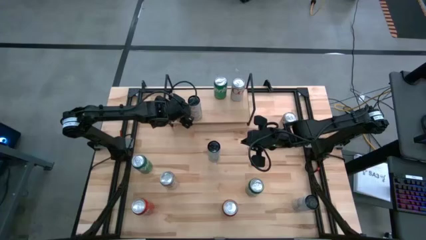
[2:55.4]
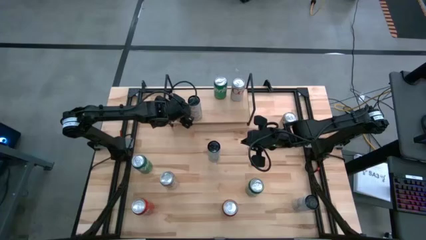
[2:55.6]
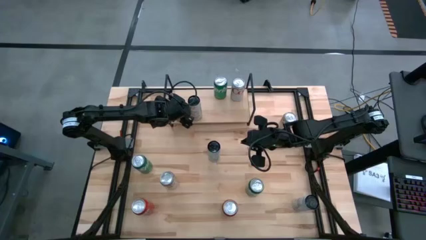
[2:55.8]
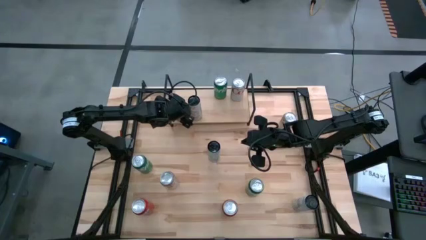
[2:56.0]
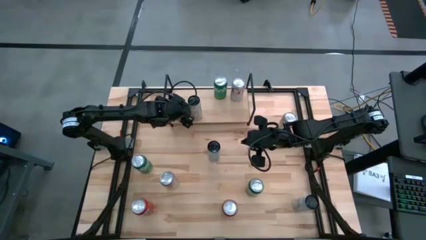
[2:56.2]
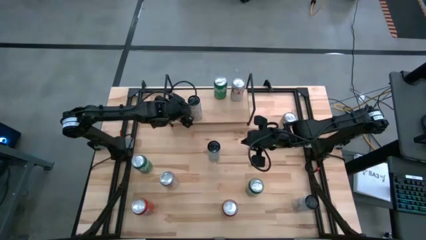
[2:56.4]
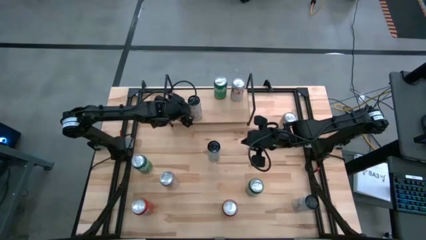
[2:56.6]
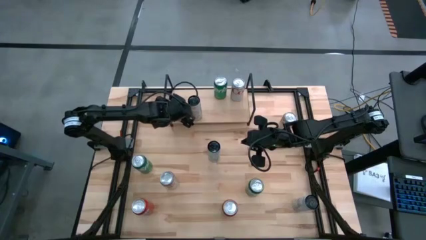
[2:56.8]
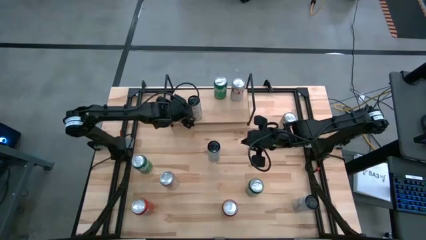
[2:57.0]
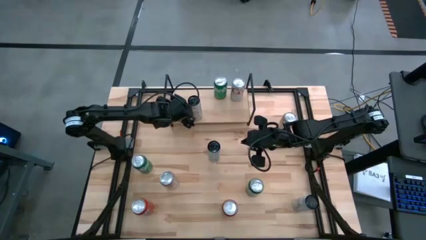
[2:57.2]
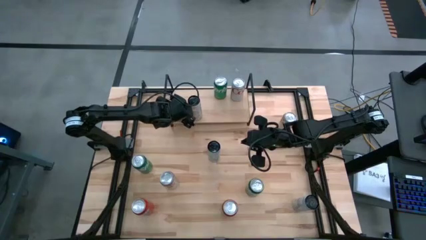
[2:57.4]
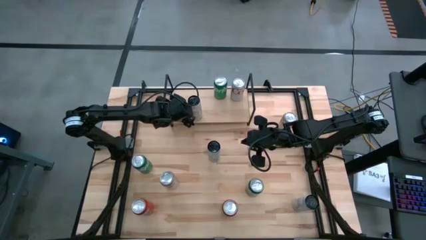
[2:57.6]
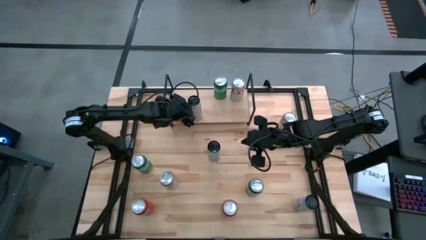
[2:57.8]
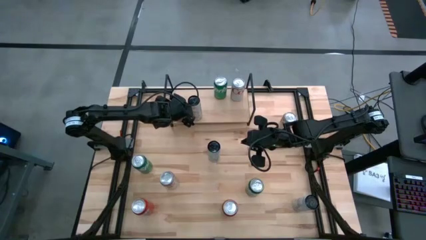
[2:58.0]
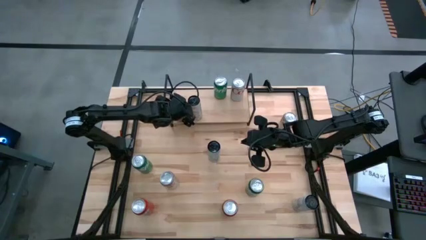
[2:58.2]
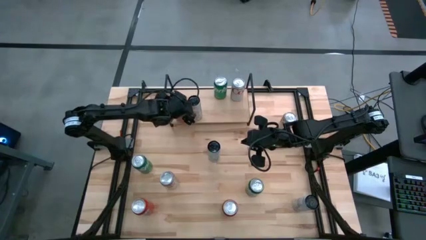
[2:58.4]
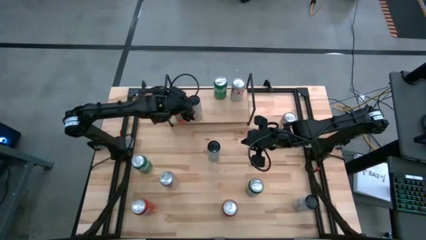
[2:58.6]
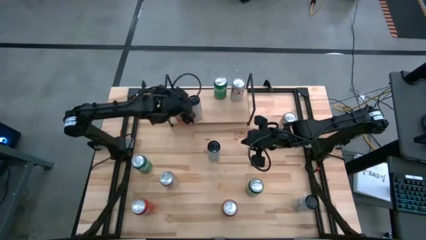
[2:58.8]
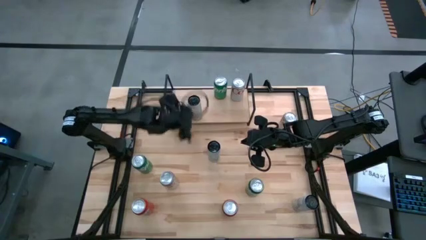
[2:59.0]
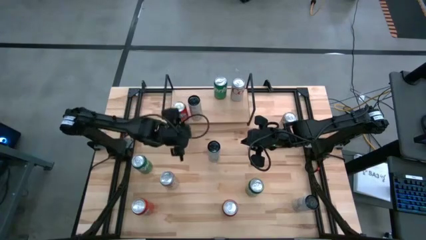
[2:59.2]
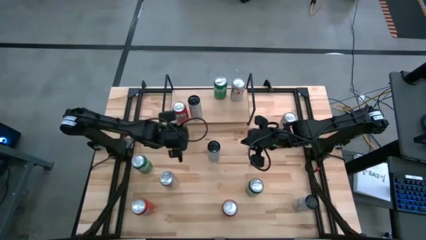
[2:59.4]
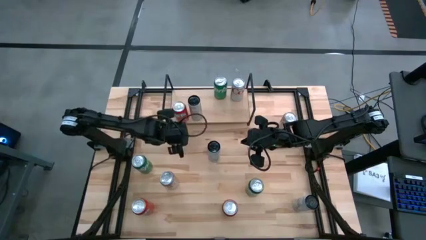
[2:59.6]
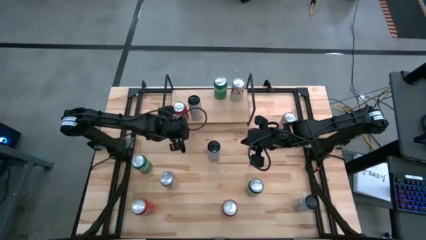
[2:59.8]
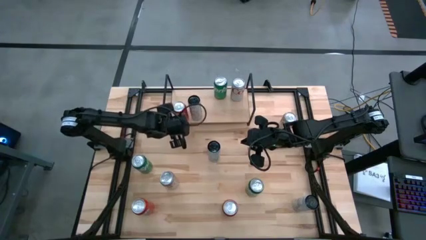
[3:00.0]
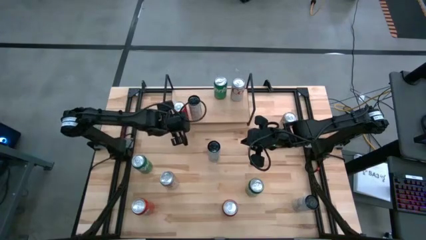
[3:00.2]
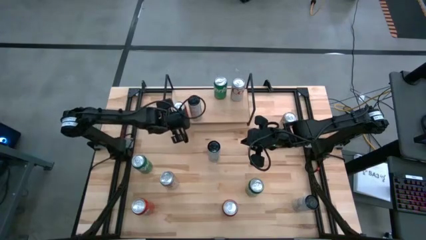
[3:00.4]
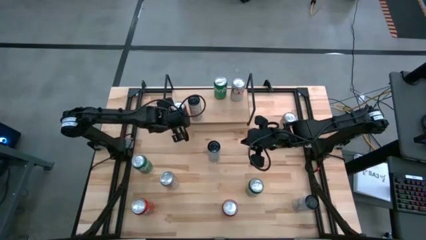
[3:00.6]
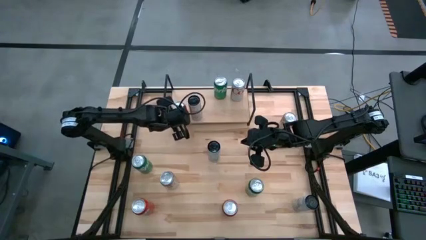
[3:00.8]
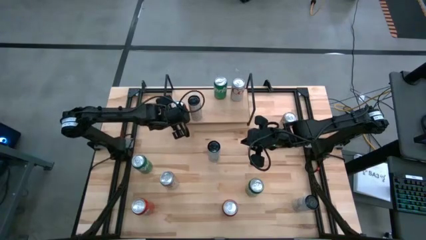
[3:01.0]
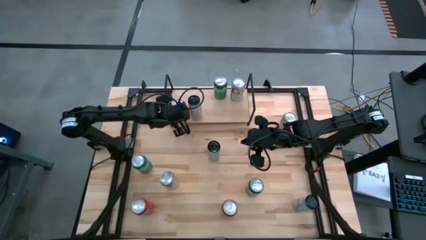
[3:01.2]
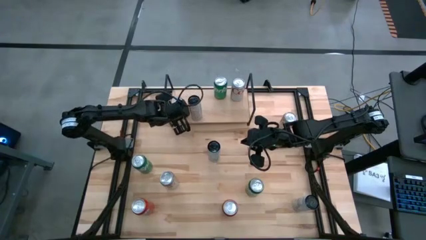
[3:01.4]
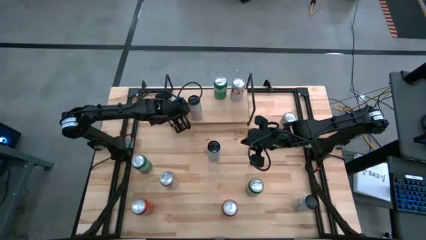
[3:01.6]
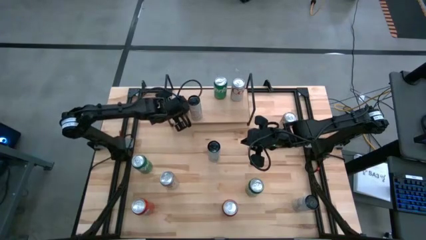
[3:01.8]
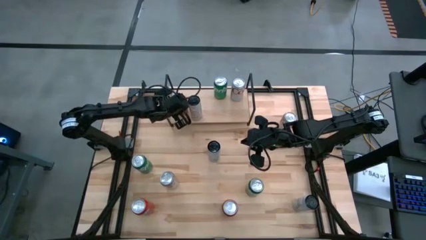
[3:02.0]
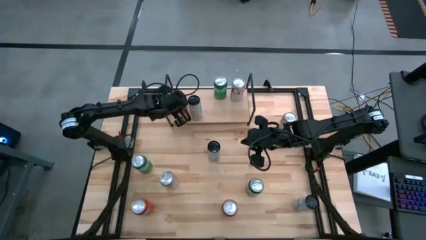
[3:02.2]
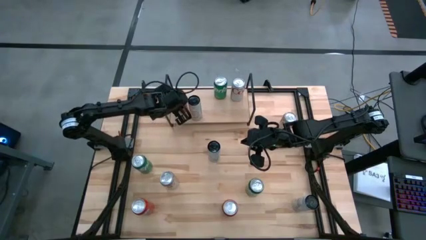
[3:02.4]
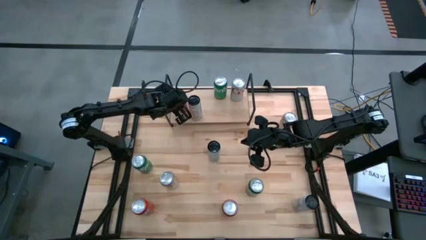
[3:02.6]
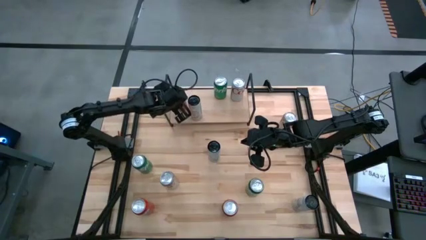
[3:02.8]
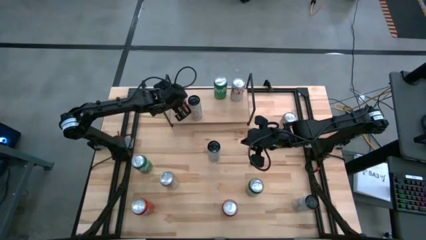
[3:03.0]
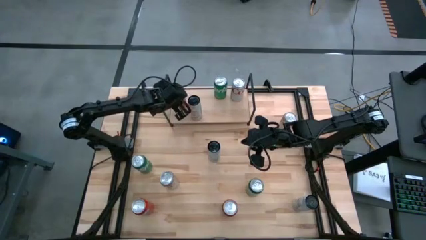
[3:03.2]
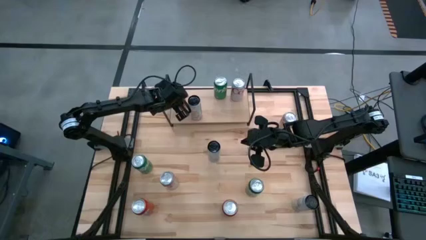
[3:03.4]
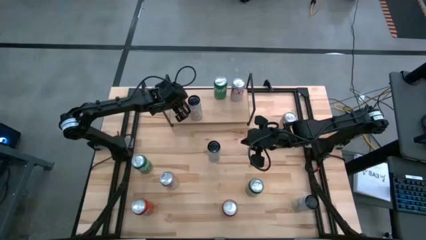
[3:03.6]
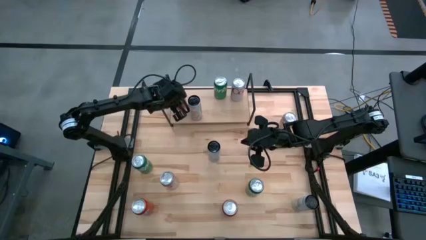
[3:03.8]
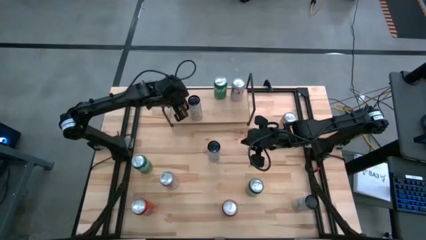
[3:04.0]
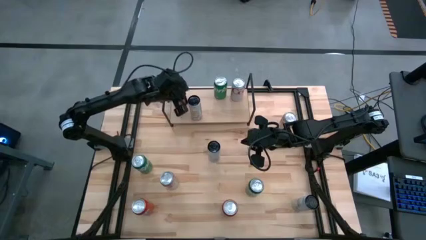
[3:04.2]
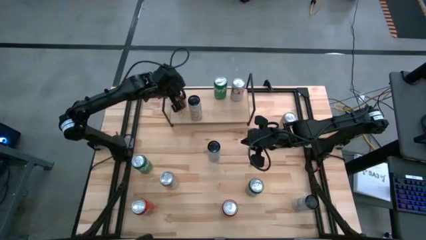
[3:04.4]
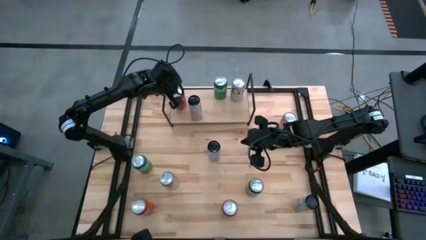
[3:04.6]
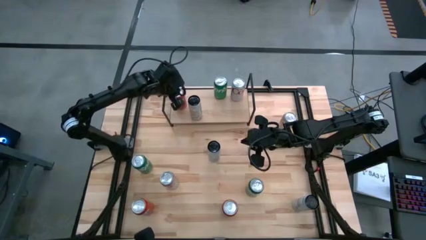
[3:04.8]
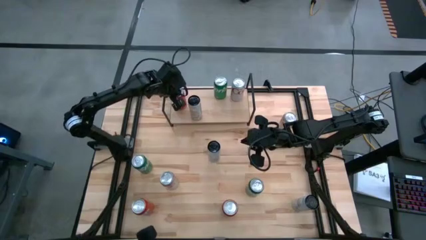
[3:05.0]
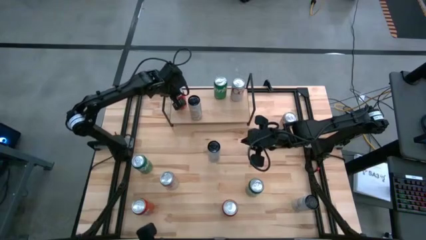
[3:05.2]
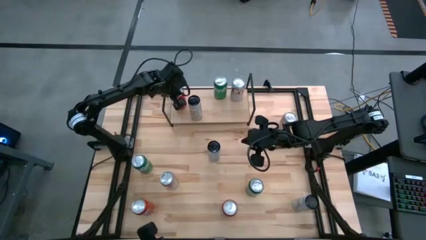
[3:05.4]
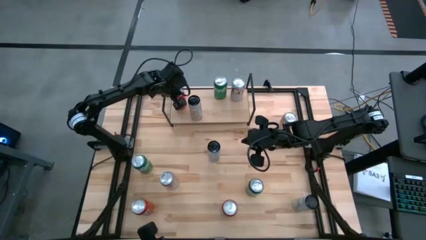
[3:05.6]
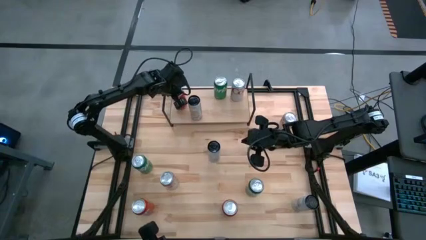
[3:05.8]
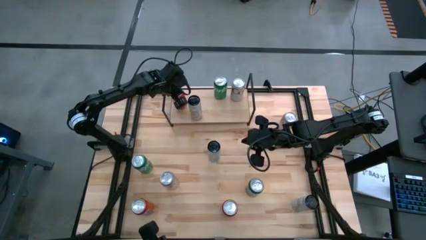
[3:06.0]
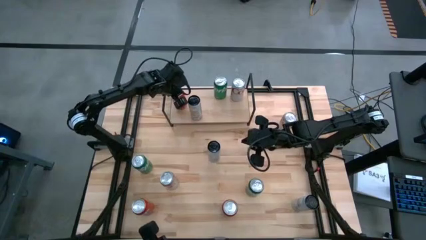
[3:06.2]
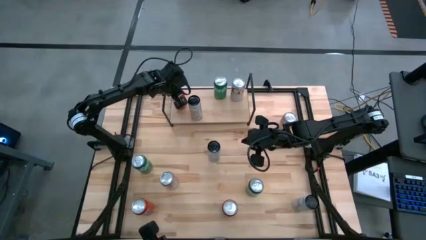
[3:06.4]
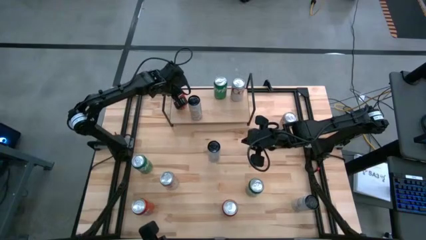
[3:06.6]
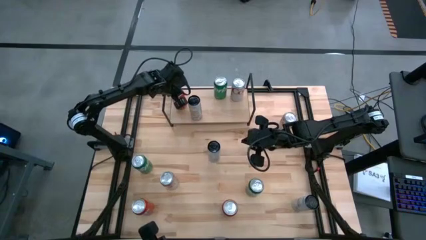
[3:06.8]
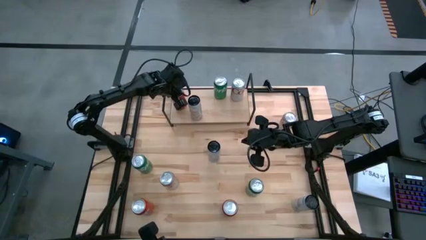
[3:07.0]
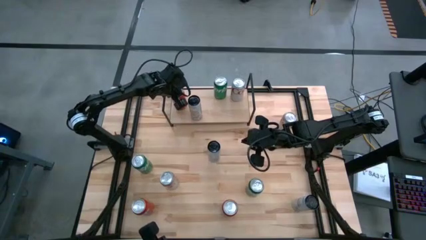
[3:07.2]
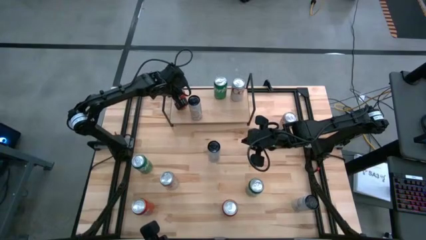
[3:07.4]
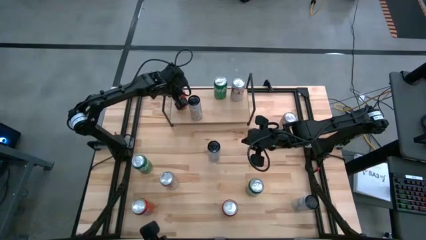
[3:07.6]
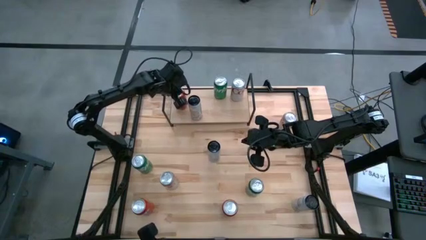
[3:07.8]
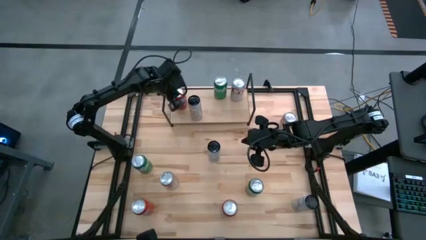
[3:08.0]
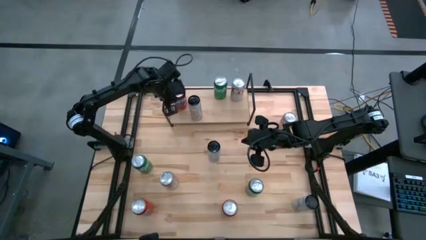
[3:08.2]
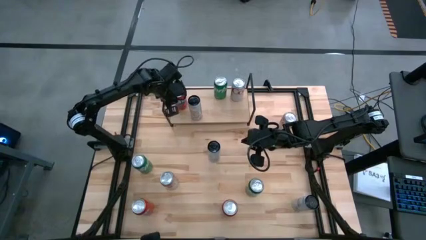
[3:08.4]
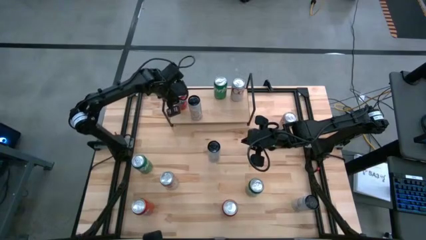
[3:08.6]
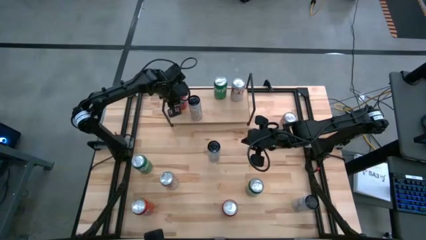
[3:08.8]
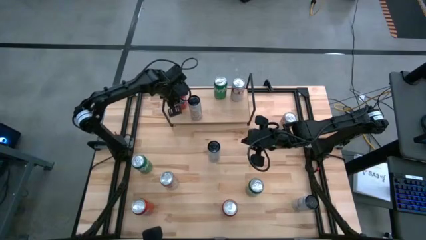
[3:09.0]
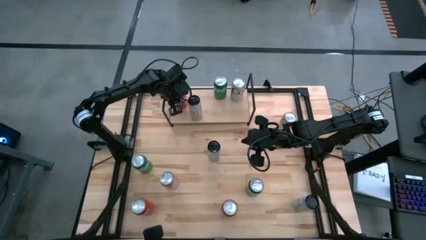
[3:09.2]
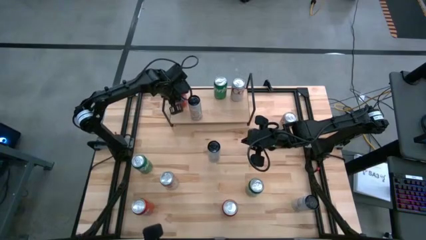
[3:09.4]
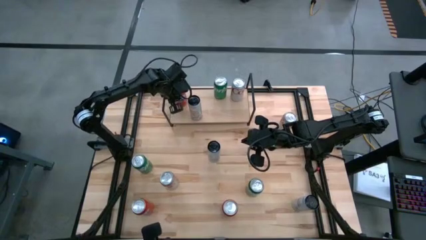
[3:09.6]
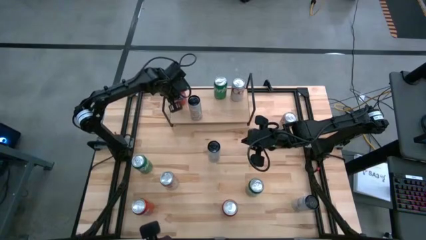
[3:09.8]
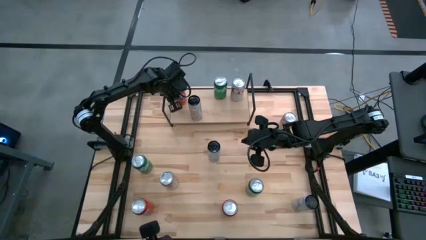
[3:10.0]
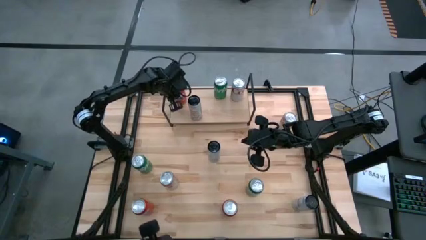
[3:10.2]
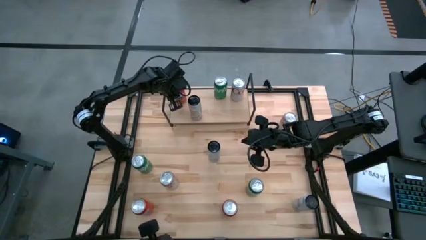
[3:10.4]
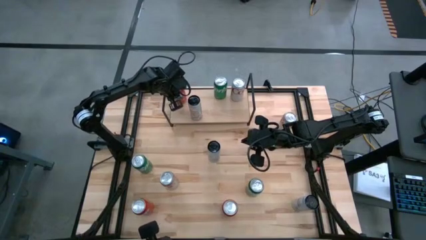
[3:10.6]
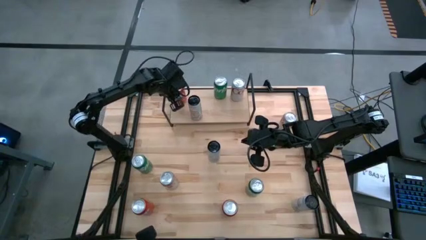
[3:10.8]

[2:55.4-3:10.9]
Task: Sort soda cans
Put the top red soda can on the shelf
